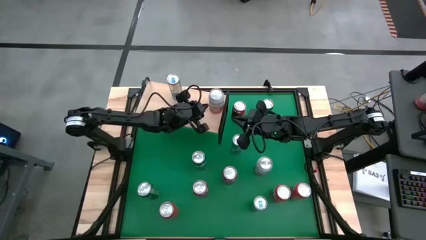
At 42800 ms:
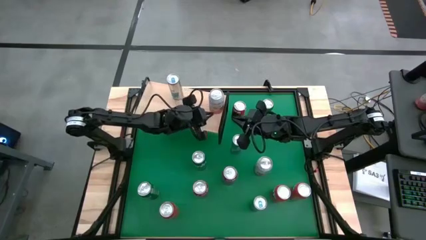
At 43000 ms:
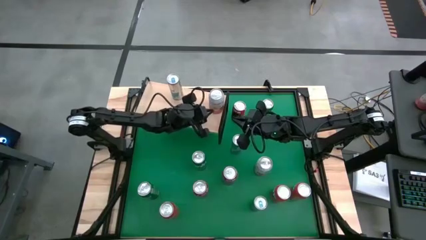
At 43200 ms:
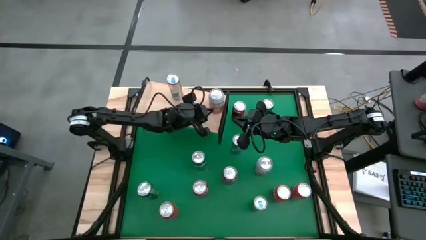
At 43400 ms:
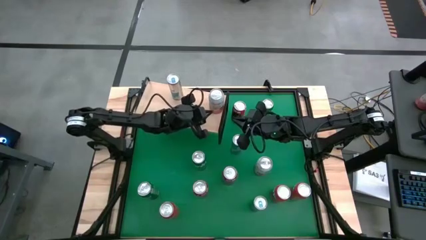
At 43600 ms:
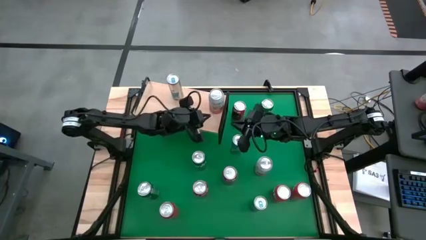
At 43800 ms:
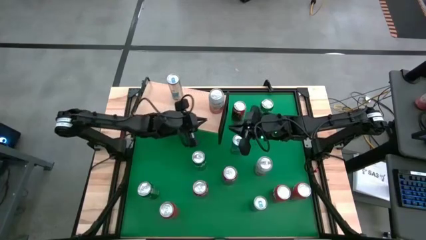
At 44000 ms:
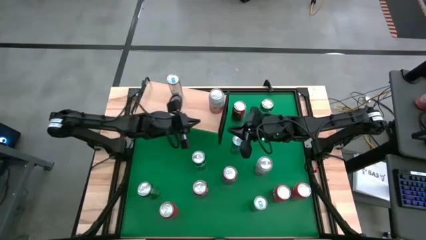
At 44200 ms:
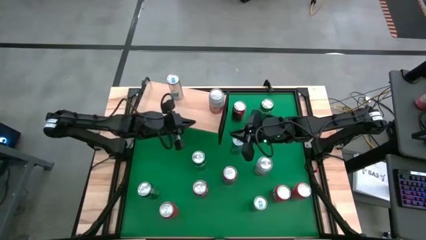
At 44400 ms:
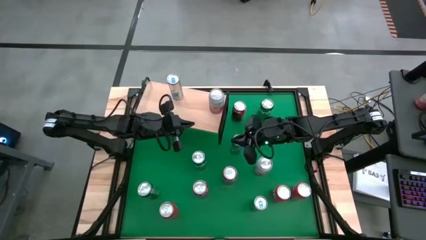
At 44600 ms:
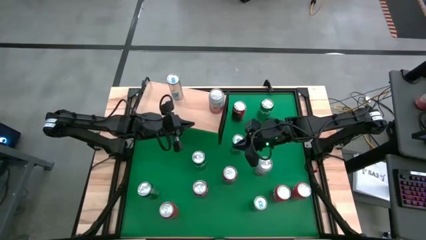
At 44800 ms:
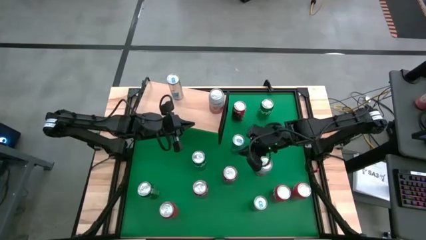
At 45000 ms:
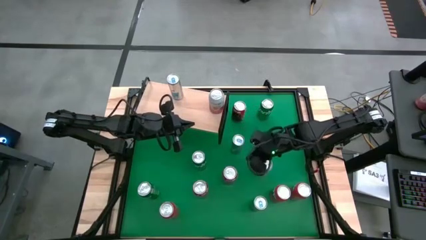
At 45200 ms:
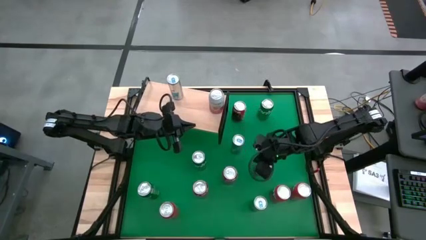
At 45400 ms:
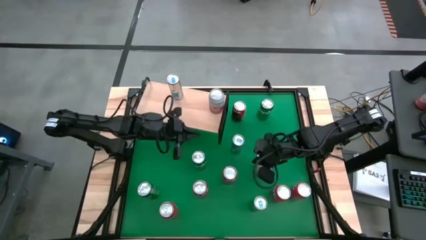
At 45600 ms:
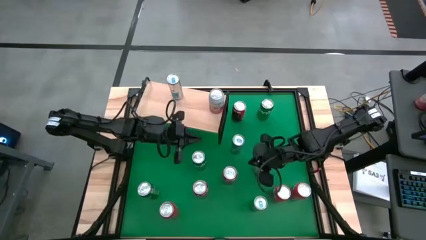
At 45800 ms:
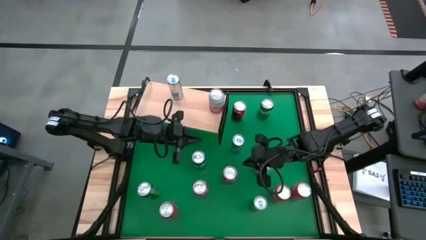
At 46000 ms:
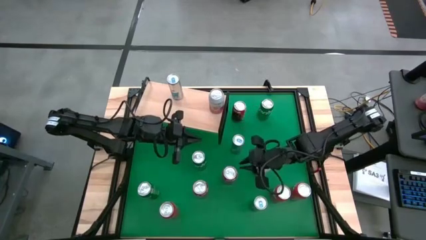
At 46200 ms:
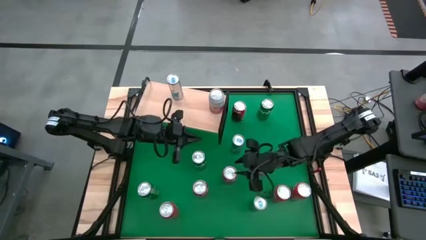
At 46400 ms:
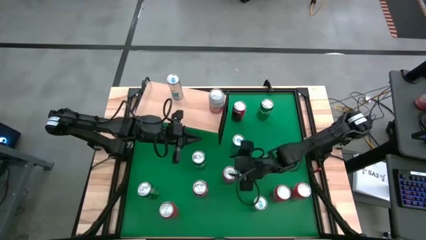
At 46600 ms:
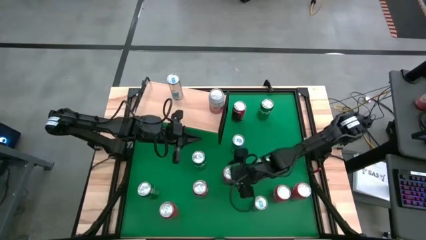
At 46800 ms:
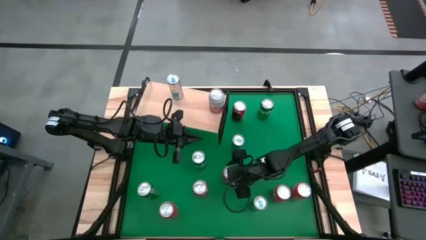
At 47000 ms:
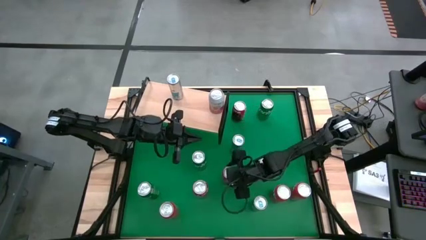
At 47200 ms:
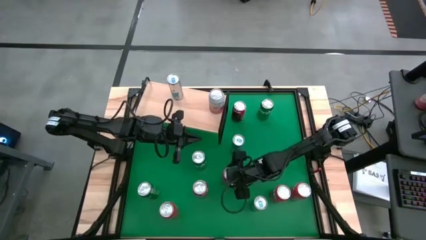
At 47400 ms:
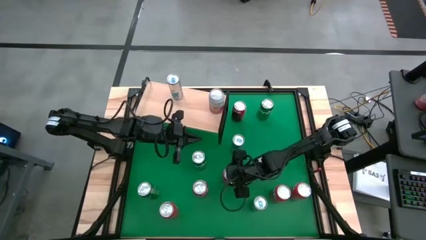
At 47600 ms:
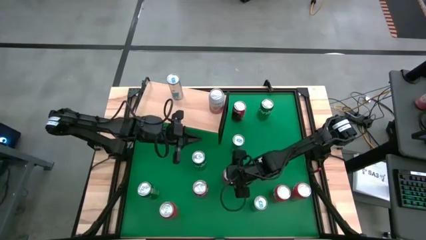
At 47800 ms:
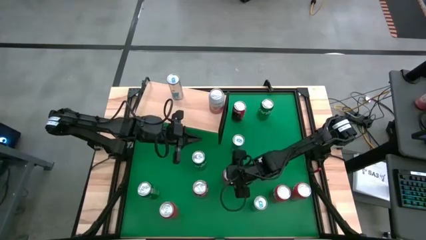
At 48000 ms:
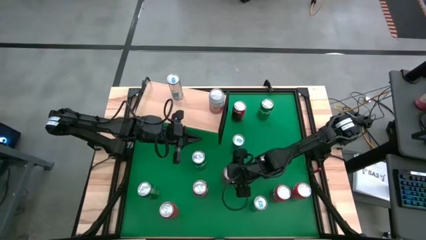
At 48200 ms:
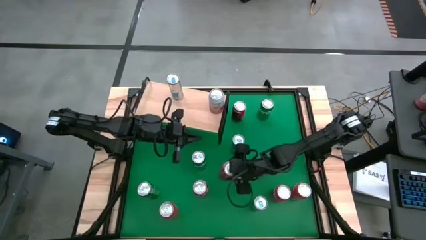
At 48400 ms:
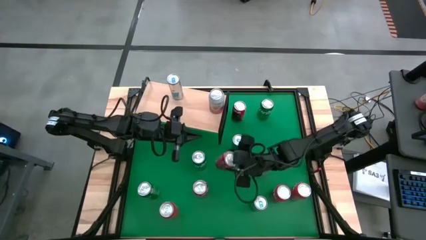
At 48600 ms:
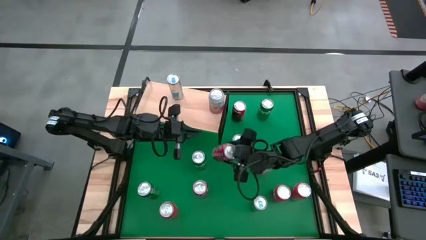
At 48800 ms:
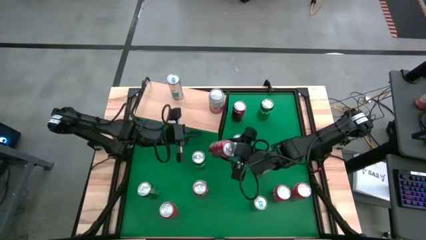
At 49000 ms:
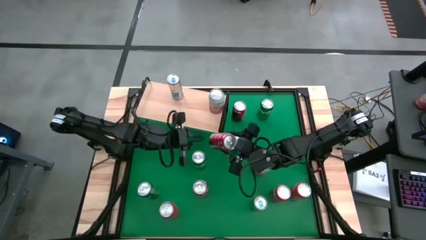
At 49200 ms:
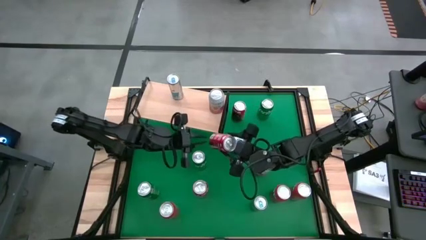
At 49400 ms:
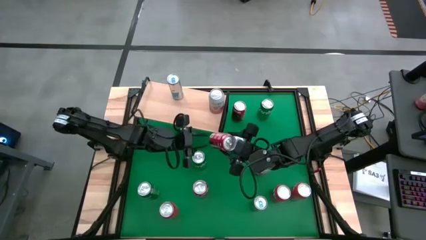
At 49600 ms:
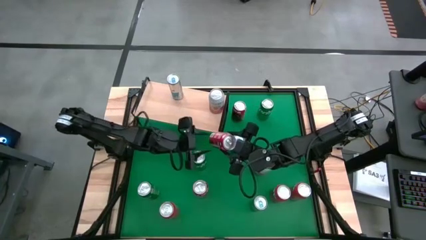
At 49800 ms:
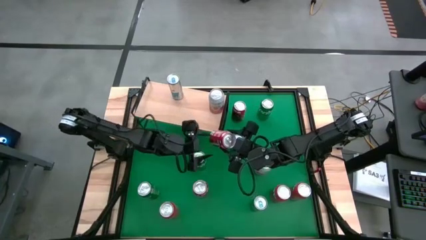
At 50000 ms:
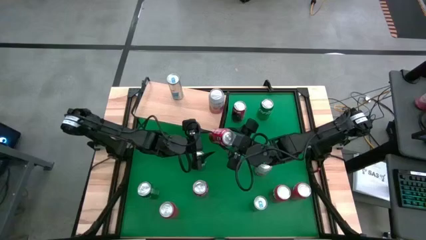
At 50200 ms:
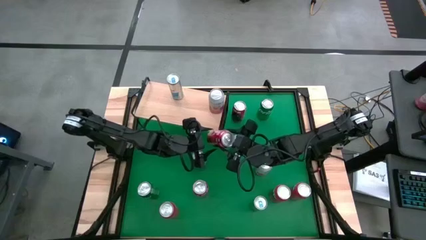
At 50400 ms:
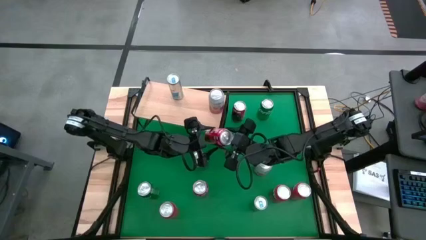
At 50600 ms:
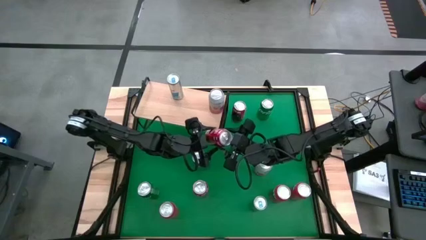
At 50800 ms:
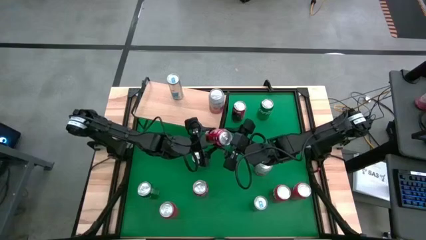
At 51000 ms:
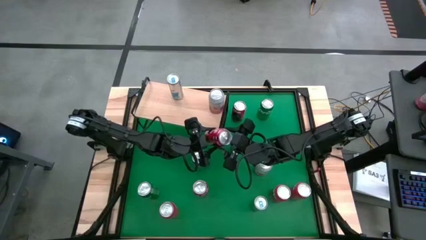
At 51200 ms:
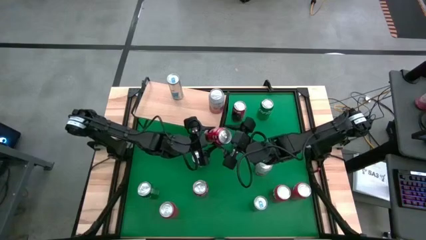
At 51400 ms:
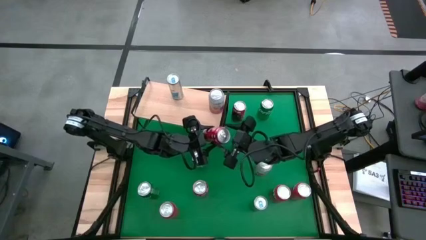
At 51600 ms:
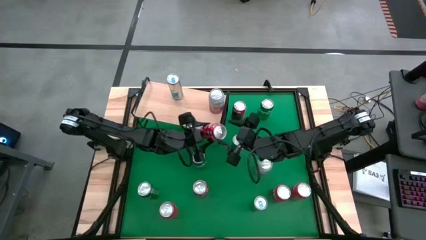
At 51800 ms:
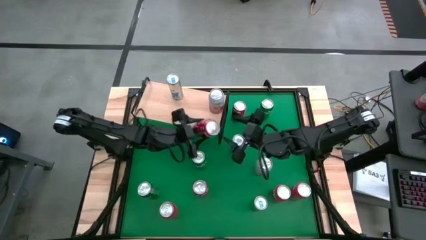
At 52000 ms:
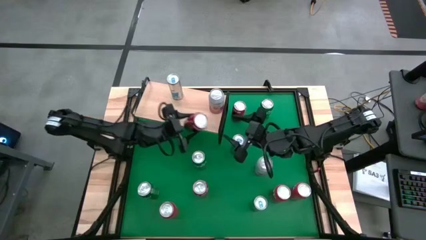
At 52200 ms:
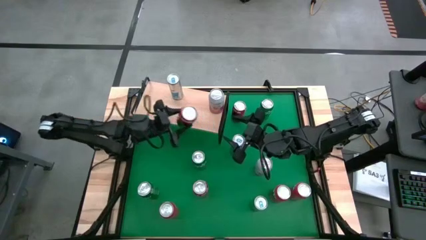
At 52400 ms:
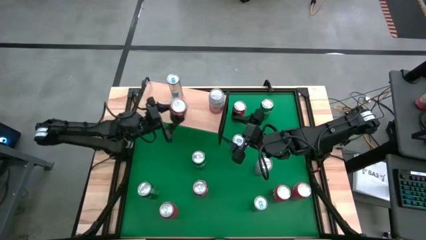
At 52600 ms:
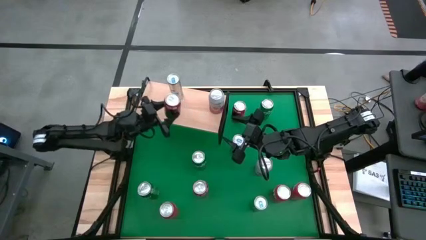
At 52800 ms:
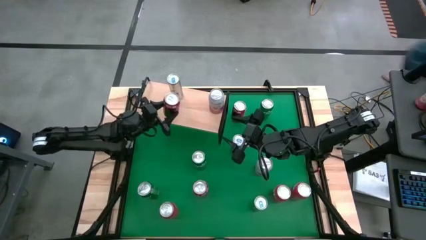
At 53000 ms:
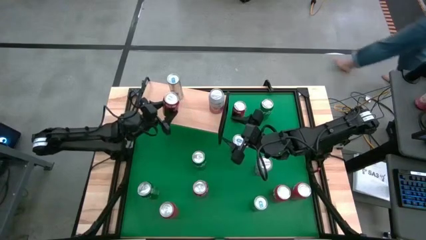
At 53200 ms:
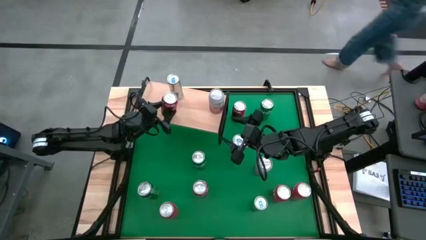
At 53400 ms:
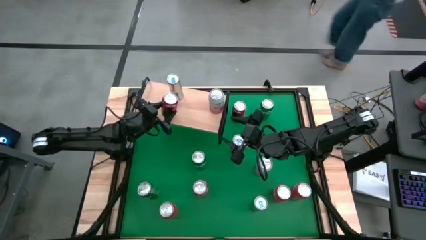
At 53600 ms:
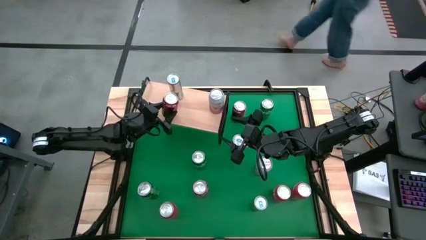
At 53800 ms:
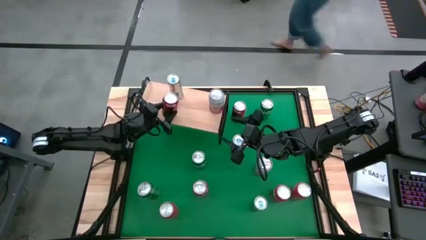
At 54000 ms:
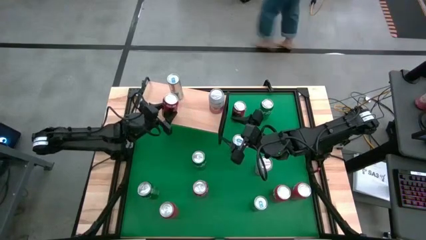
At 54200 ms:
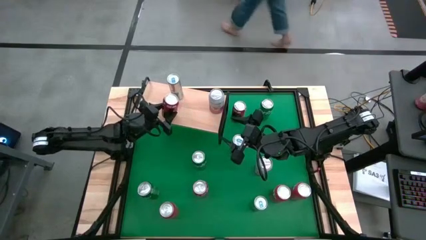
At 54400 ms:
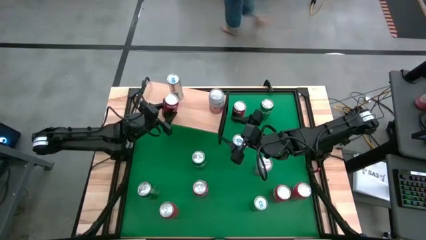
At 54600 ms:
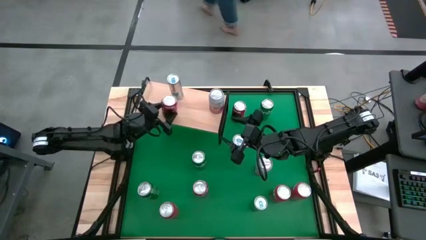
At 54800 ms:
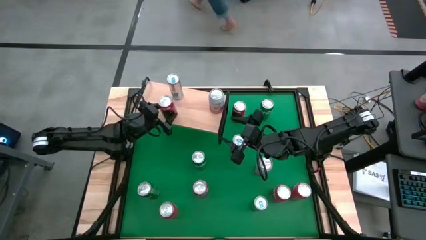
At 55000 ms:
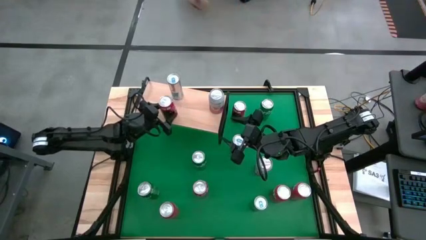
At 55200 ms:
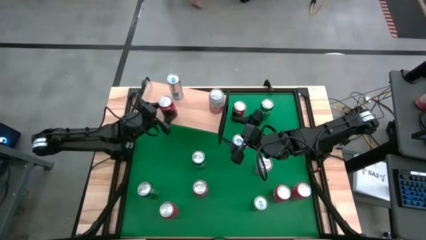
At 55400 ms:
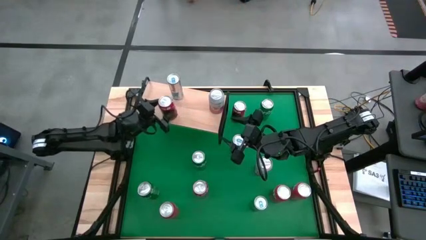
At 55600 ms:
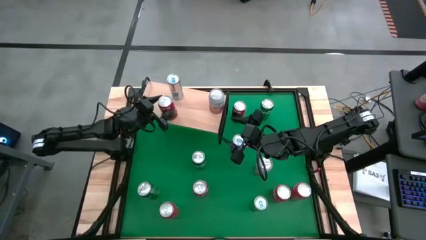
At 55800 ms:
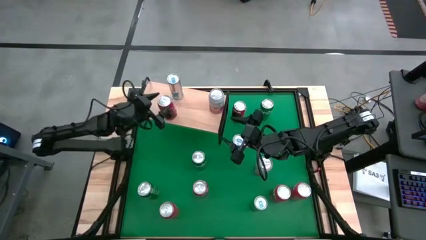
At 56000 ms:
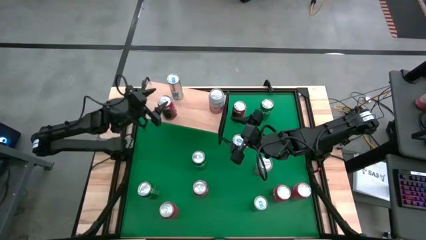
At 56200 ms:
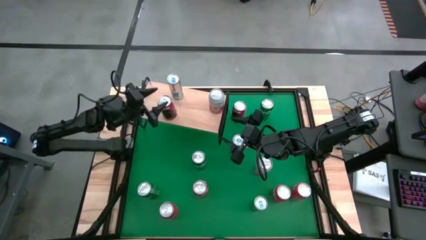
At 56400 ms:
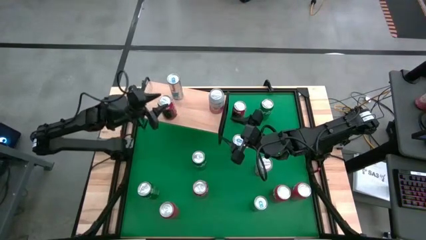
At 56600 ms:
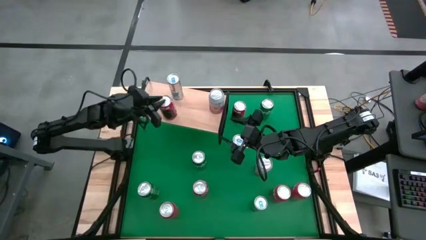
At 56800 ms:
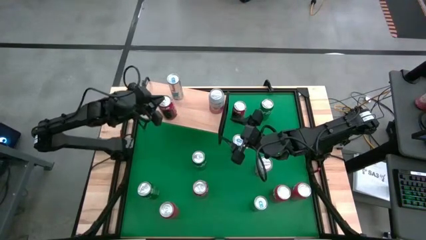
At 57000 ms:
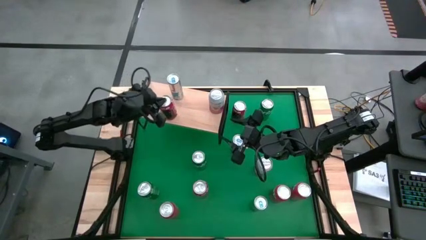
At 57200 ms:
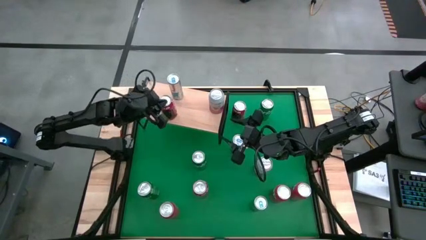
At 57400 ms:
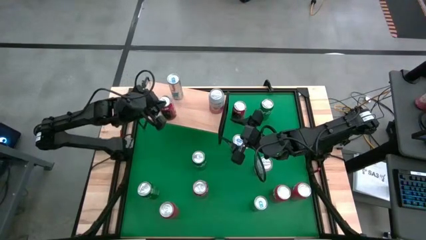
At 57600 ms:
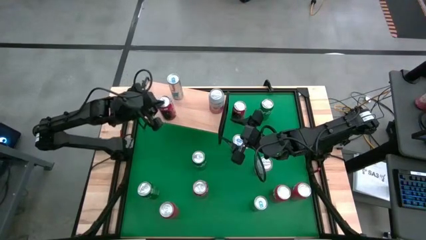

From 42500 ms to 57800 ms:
Task: Place canned beverage on shelf
Put the red/black soda can on the shelf
